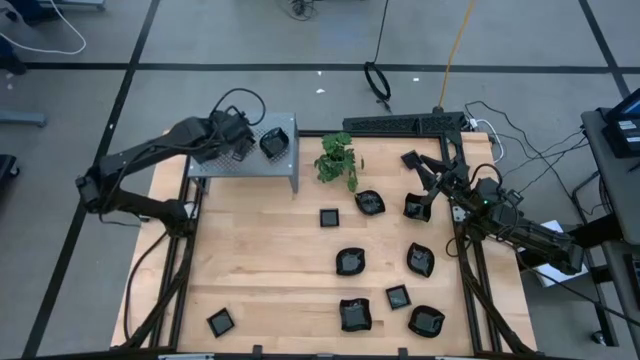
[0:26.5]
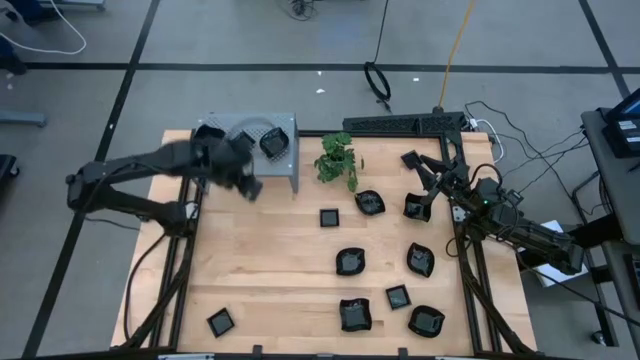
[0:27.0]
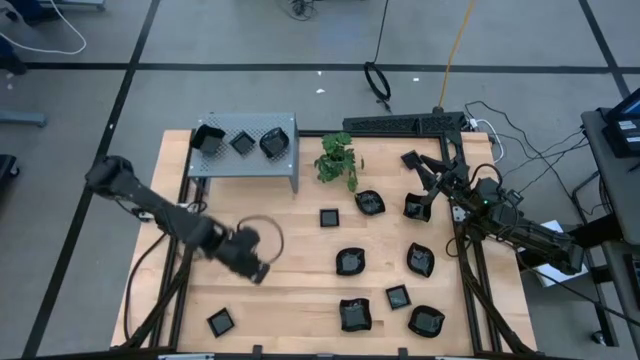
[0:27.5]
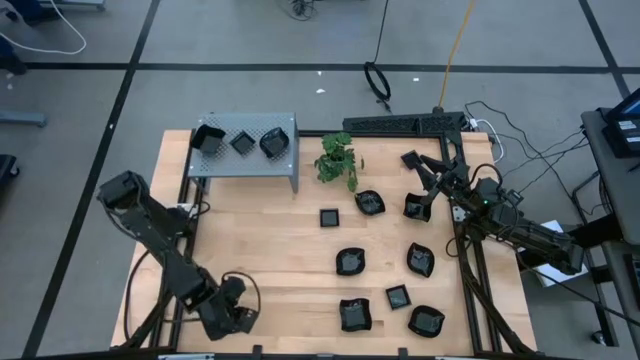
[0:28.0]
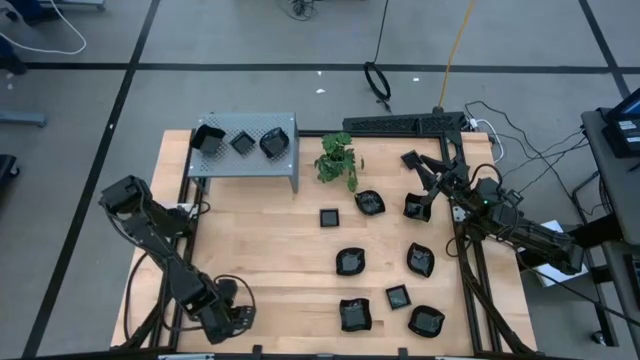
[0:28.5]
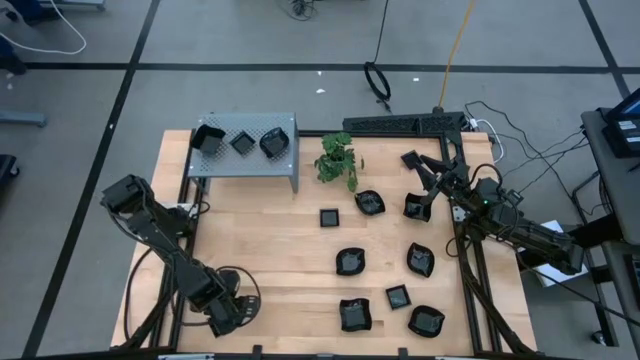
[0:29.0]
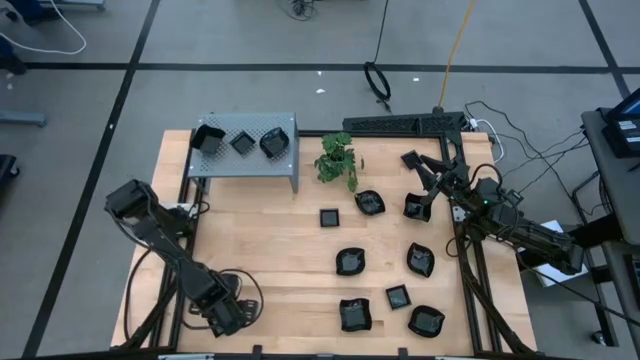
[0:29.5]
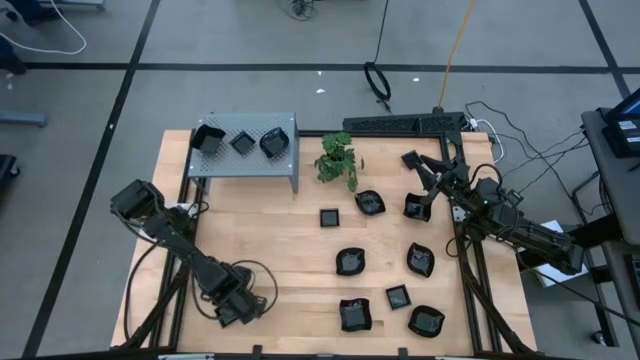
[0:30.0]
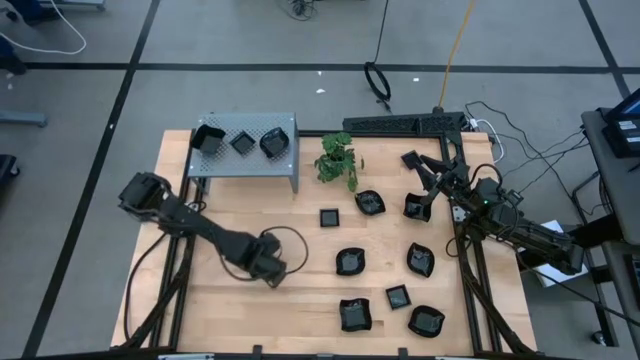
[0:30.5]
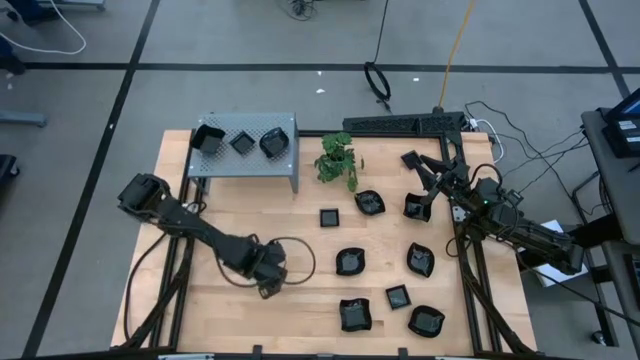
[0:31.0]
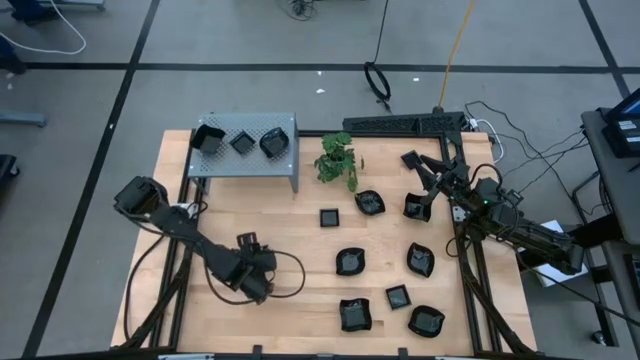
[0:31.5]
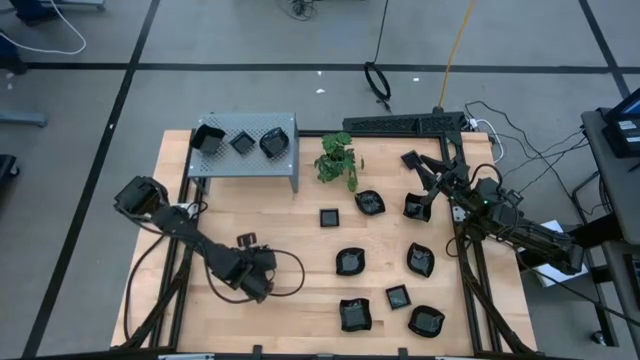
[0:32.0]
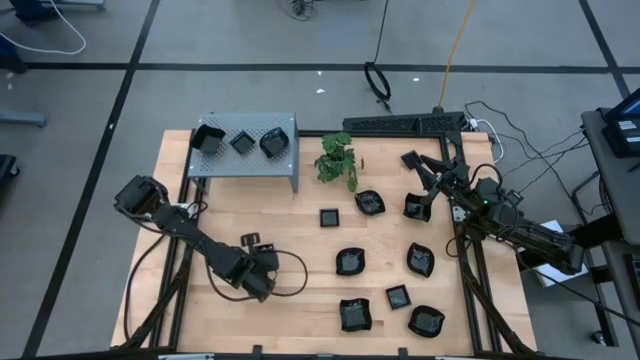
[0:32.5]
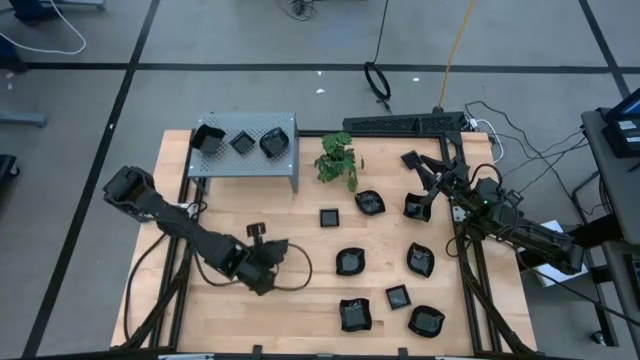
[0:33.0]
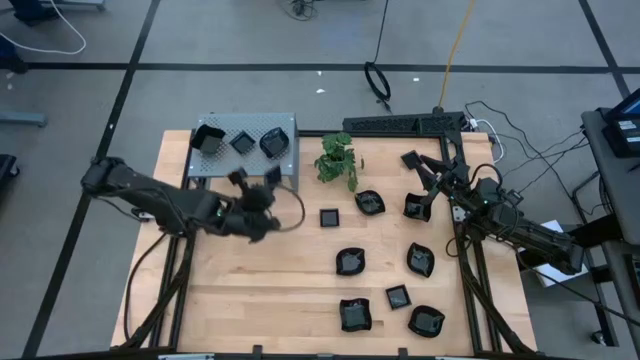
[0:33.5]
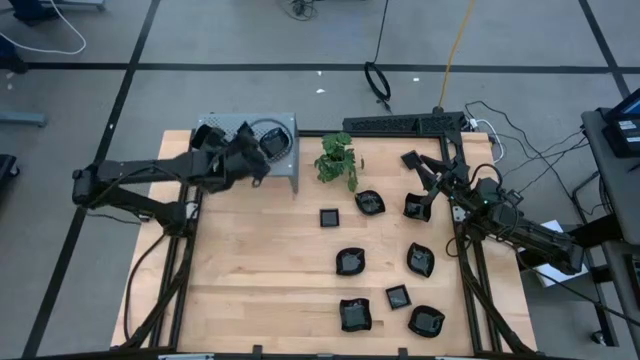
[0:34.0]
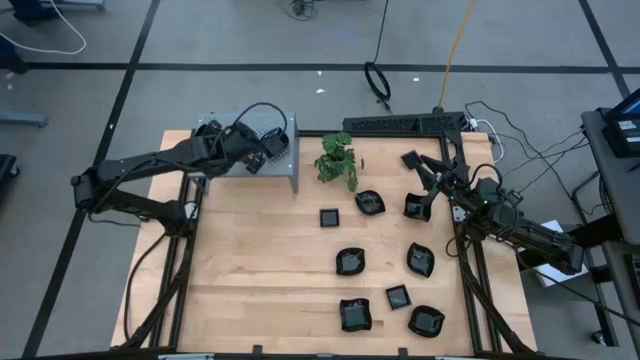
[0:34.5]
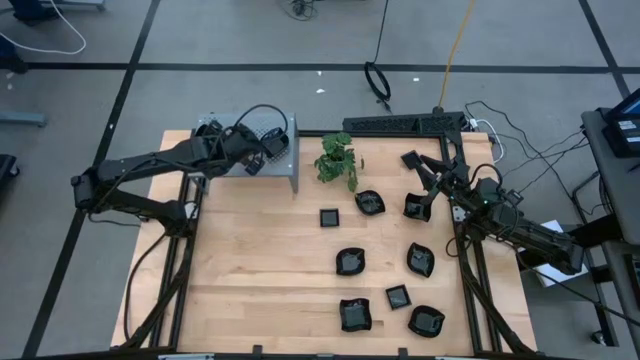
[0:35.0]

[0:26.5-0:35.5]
Task: Pick & Place Mini shaped plates
Stack the square plate on top of the square plate on the shelf

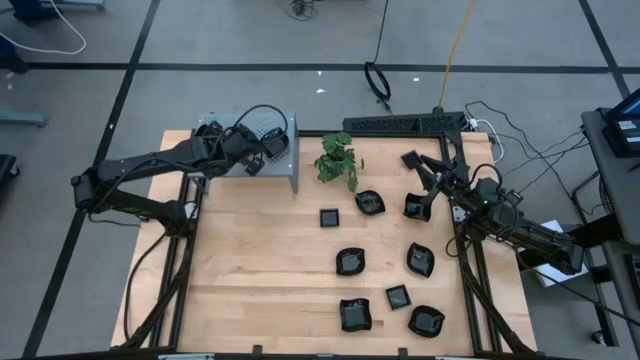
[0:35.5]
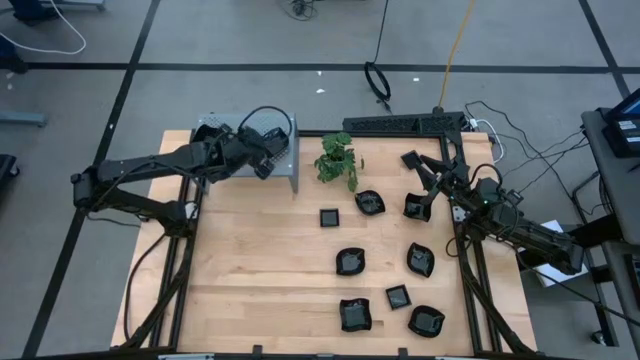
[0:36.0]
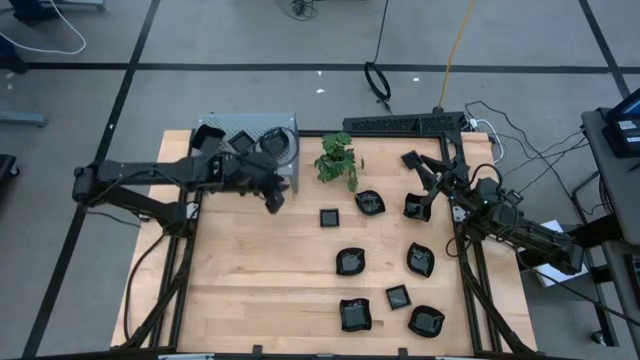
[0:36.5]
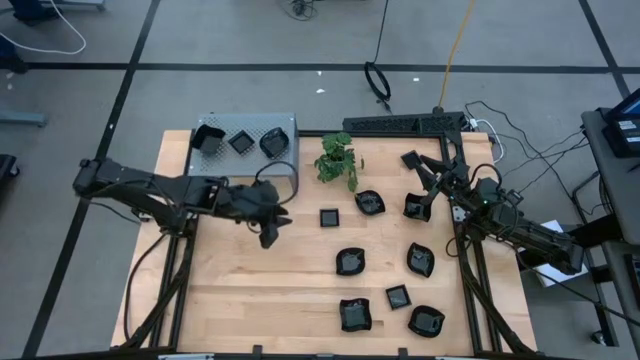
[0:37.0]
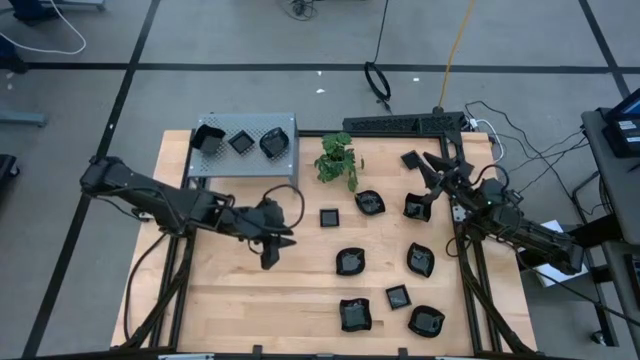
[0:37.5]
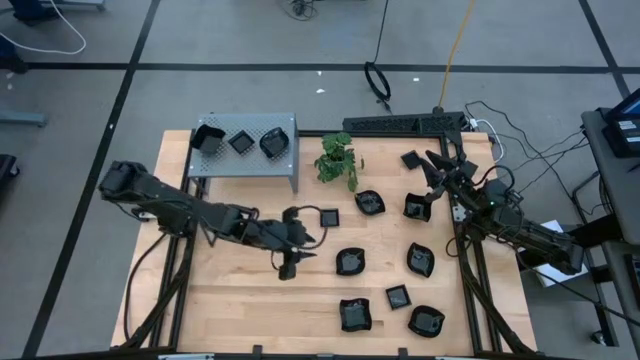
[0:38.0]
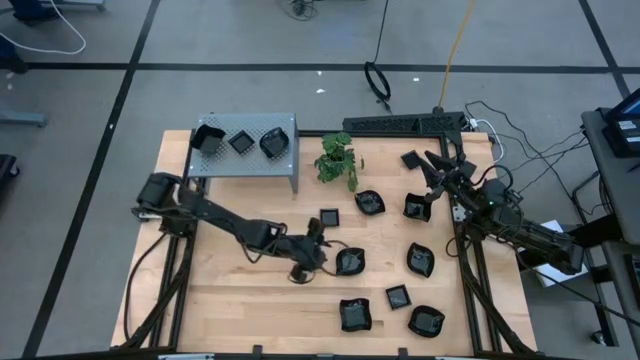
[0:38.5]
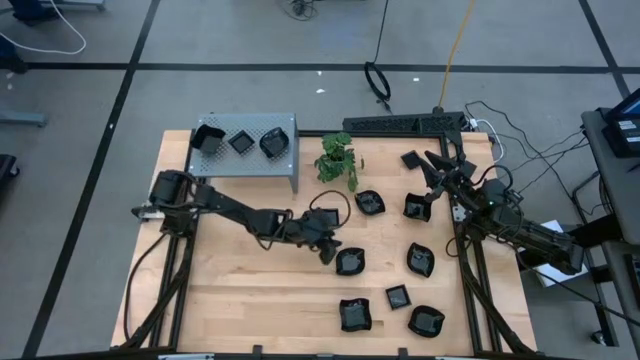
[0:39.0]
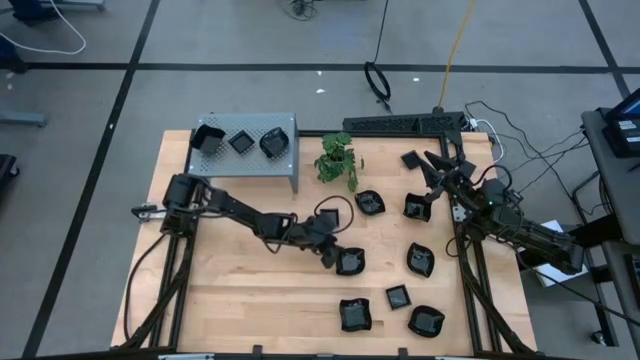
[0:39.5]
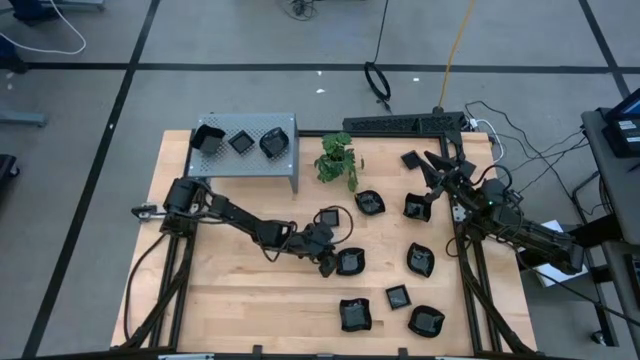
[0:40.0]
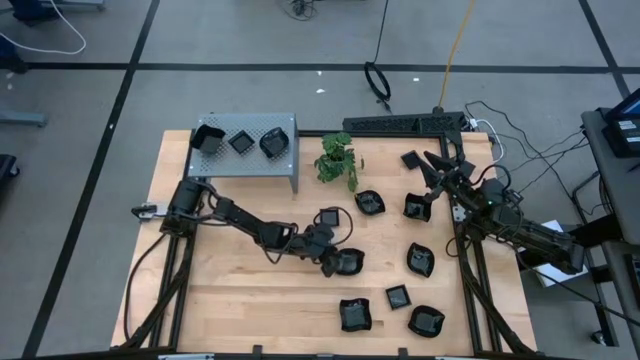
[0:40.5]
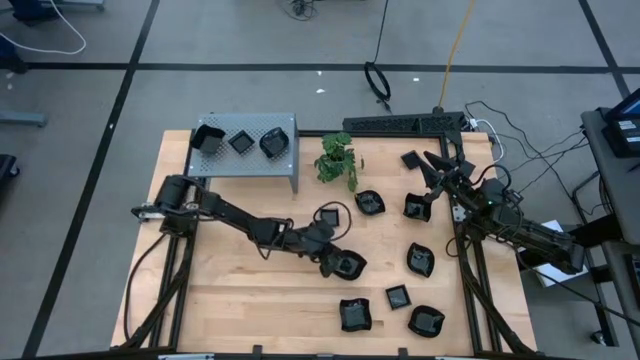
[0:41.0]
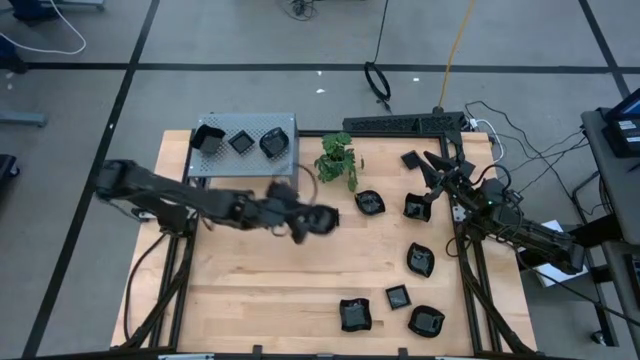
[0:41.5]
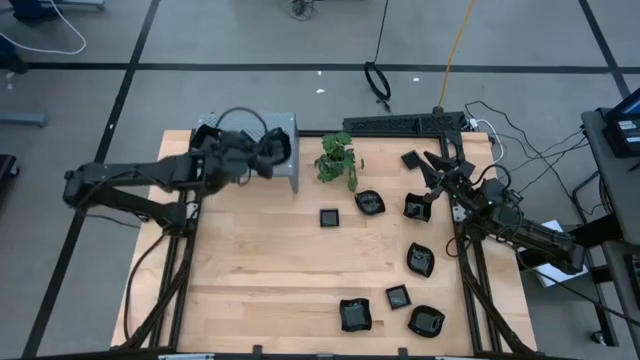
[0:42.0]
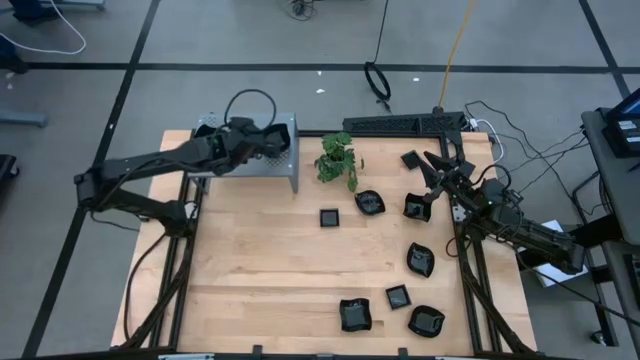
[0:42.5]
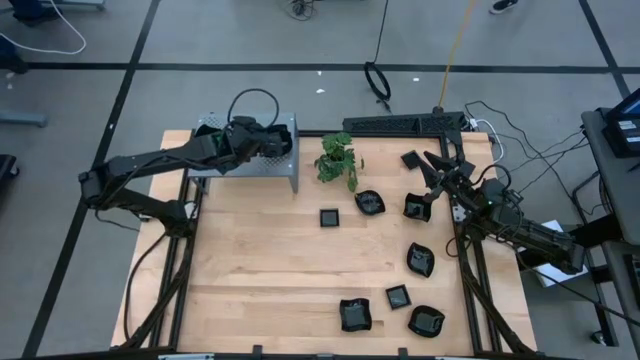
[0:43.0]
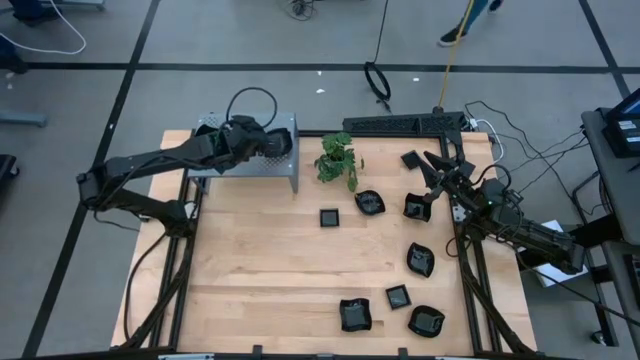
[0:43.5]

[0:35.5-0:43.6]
Stack the leaf-shaped plate on top of the leaf-shaped plate on the shelf

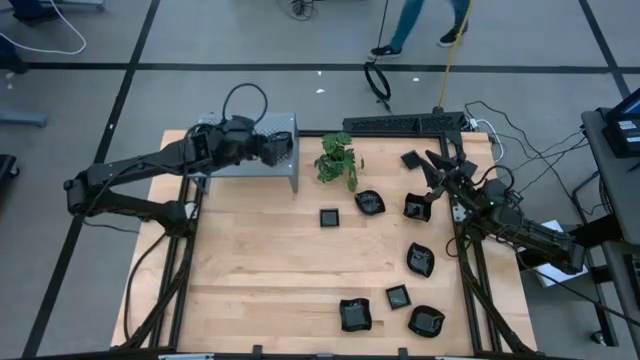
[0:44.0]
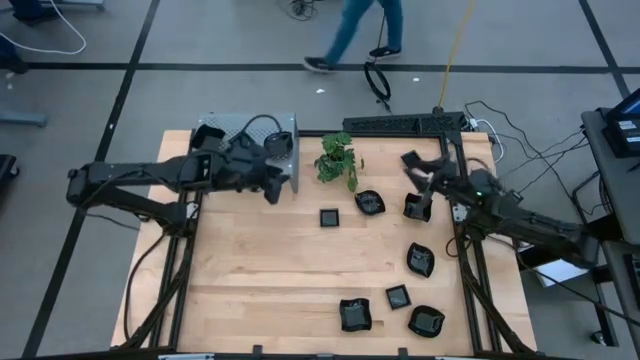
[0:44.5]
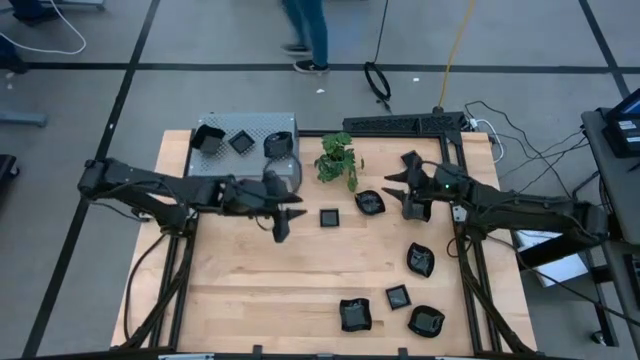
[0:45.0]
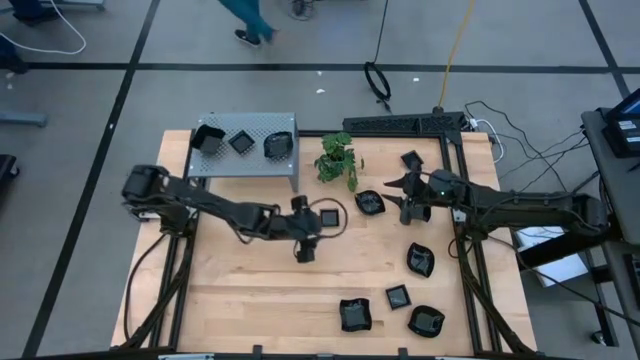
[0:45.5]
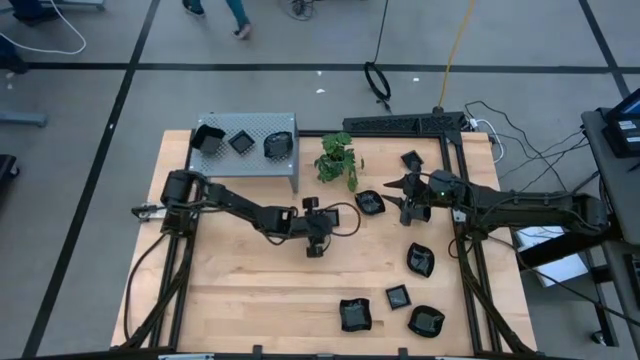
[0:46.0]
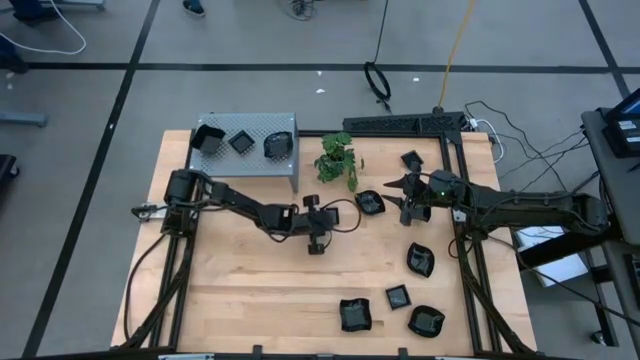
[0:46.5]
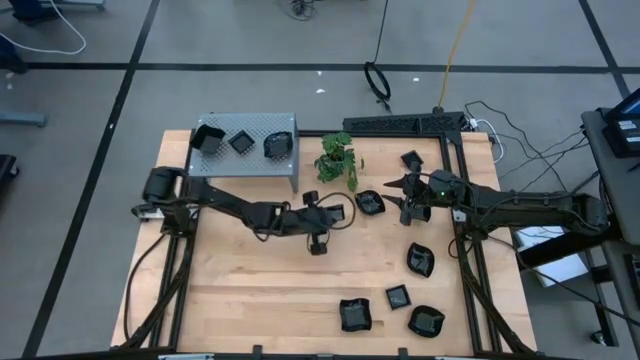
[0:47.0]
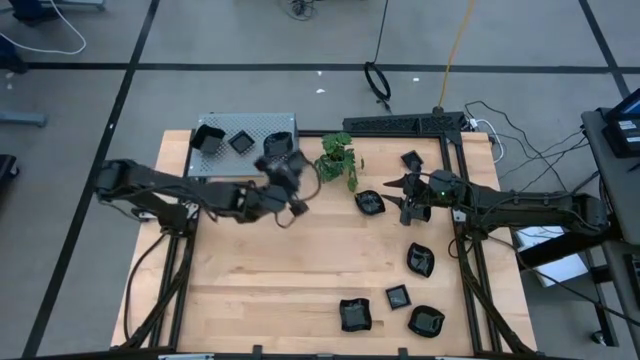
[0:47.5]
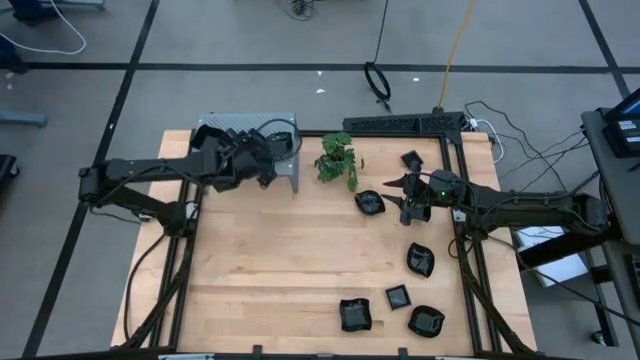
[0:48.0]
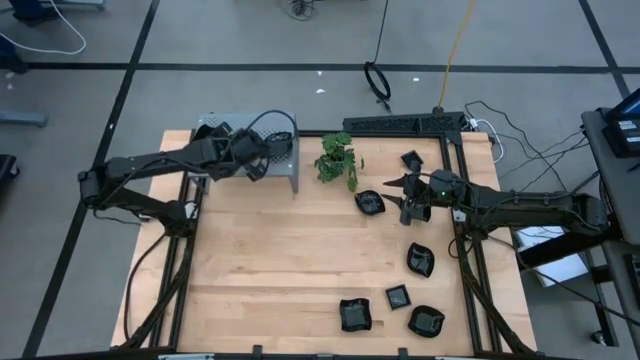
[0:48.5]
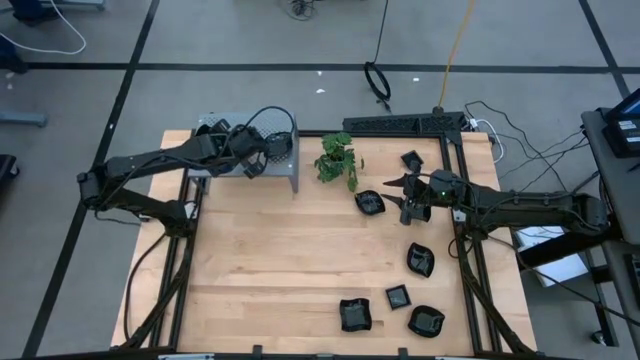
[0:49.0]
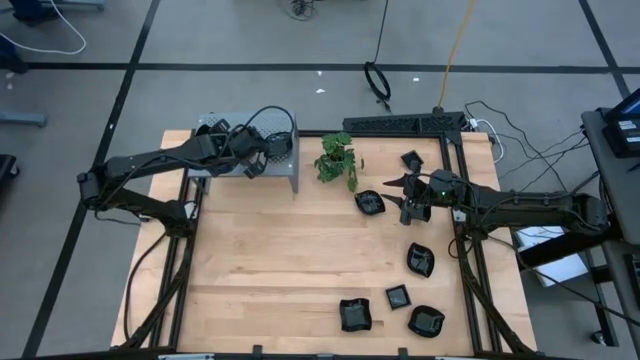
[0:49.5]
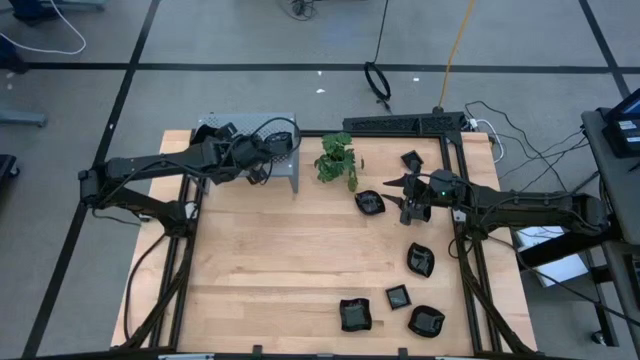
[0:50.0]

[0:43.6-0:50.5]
Stack the square plate on top of the square plate on the shelf
